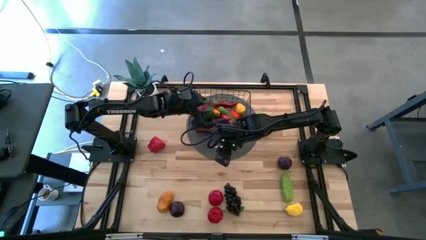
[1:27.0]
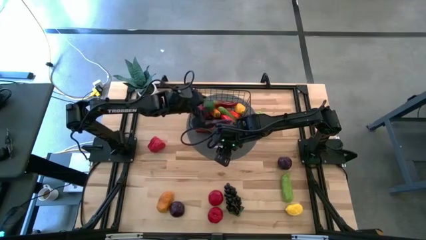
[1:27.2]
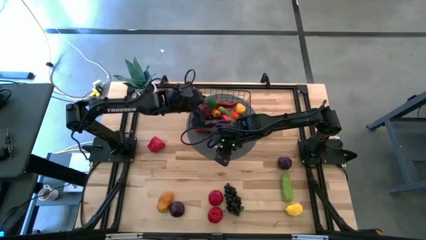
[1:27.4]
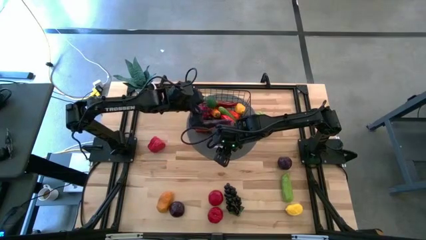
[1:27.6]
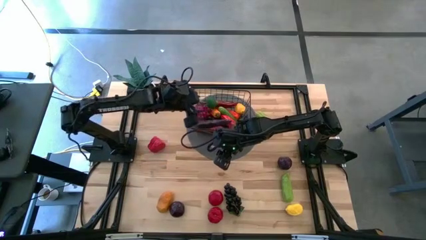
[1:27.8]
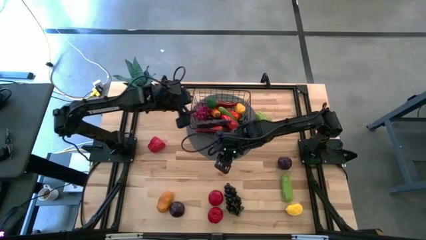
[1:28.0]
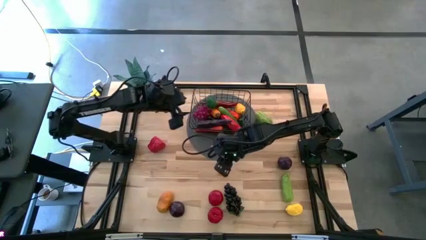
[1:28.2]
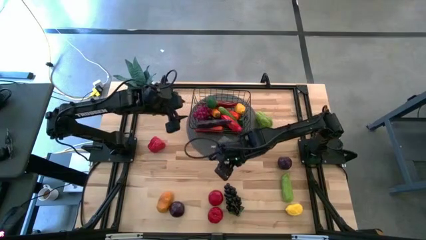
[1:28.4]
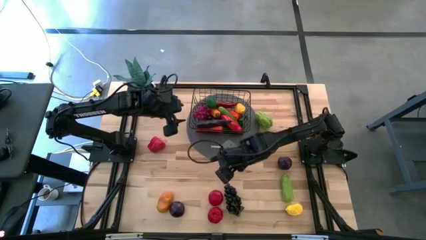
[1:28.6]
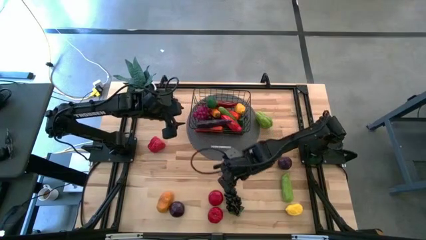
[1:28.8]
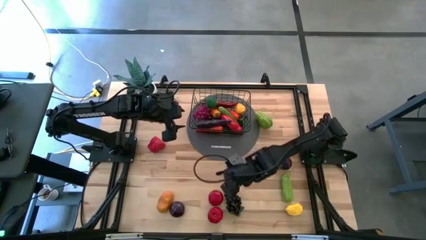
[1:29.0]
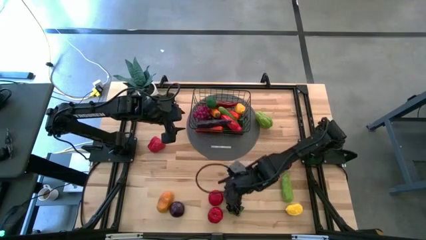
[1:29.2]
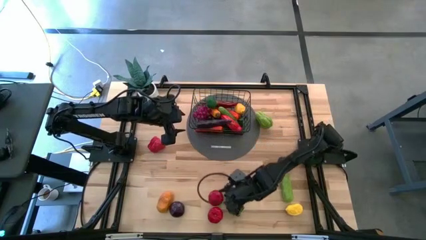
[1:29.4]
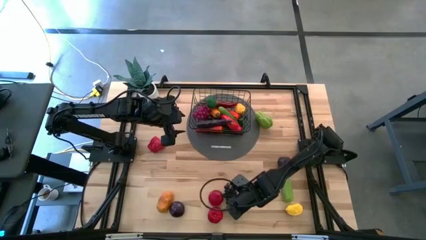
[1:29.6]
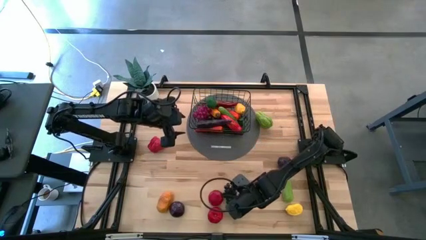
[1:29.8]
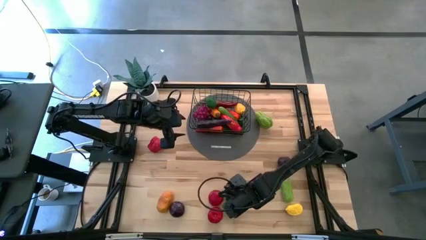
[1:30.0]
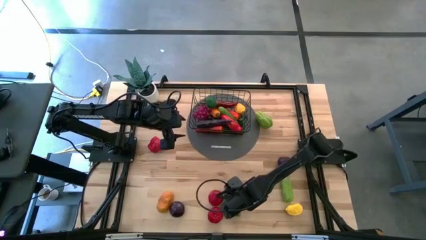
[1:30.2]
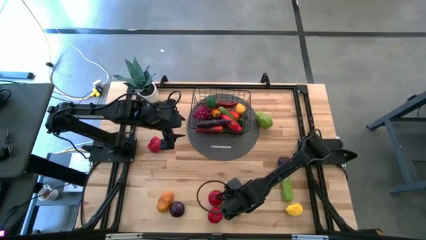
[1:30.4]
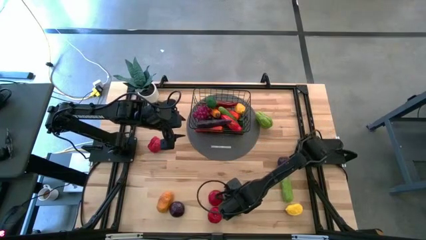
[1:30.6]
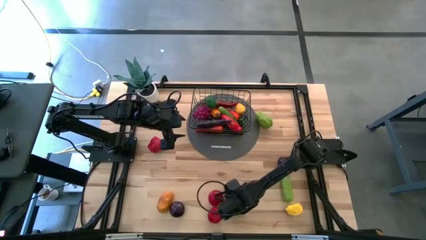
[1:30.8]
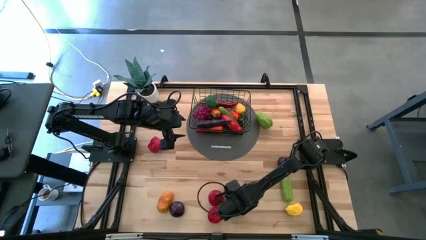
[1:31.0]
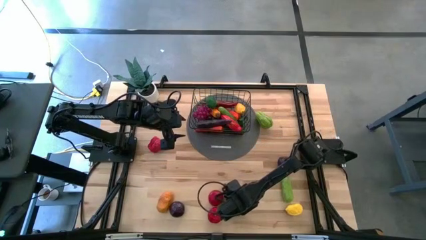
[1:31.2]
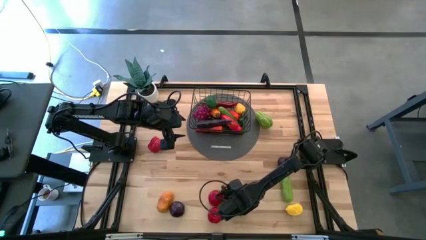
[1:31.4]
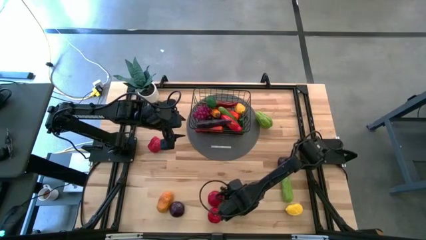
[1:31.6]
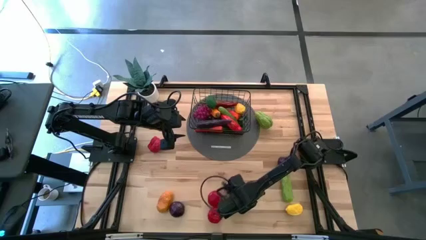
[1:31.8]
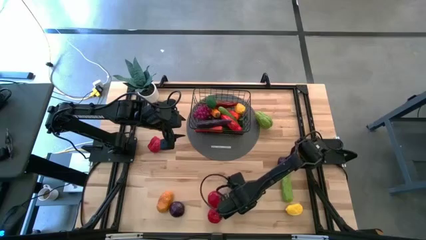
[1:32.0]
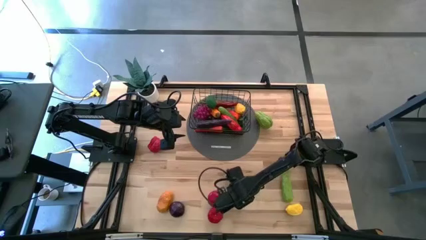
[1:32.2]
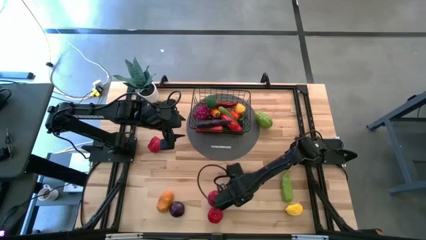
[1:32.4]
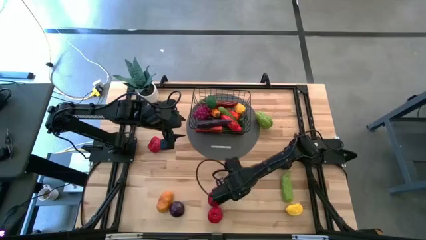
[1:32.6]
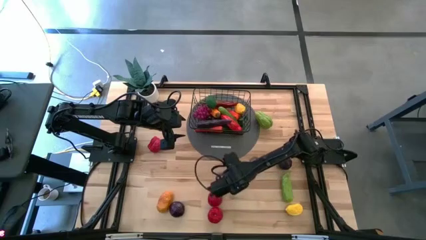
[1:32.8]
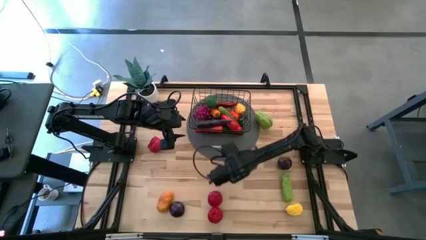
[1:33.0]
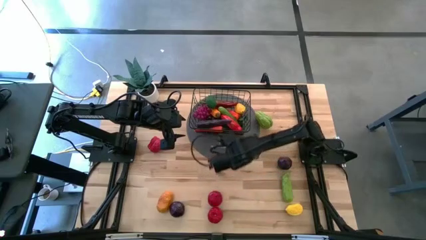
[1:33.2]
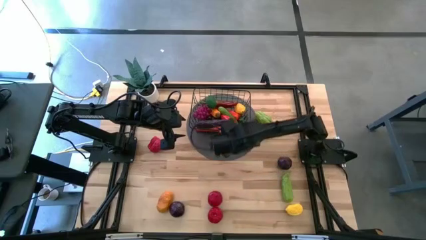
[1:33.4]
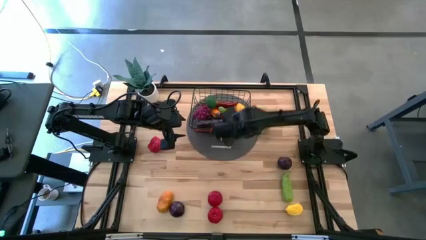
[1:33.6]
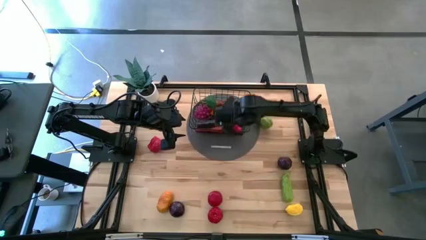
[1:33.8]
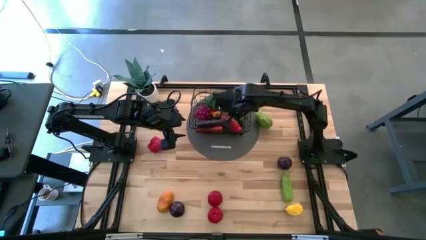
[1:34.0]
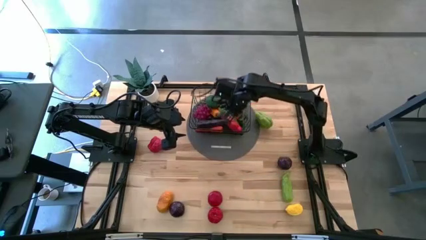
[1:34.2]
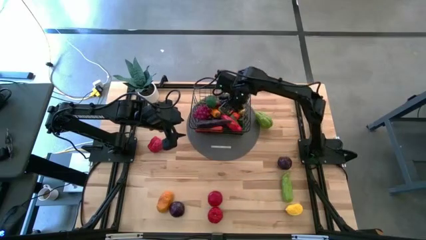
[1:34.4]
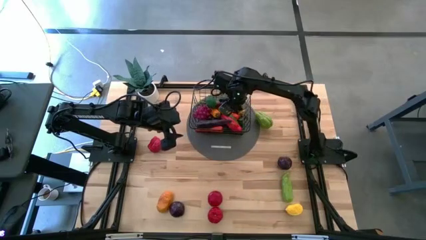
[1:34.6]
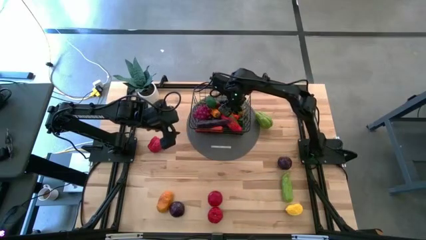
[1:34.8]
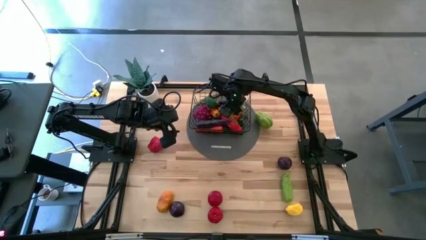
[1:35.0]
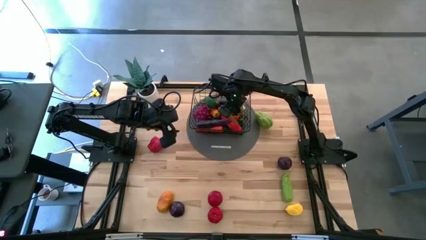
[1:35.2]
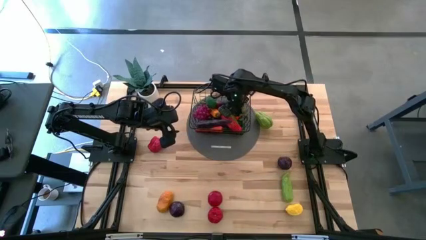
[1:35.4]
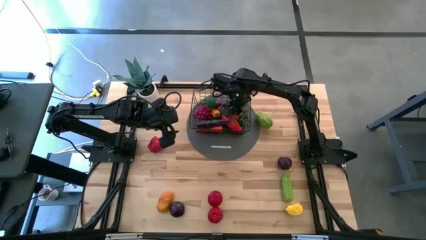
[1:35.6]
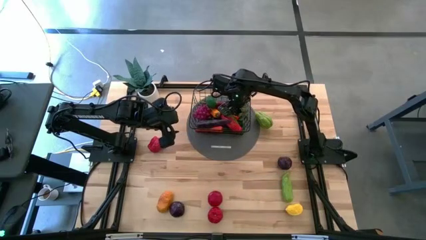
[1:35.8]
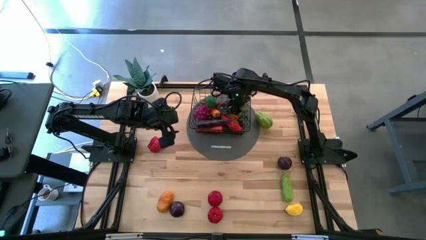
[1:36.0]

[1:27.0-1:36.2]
Task: Build produce basket
Put the grapes into the wire basket

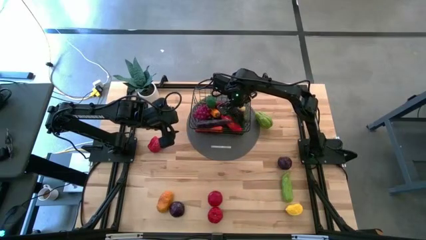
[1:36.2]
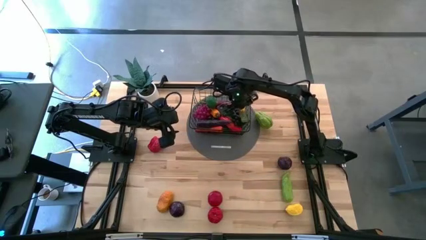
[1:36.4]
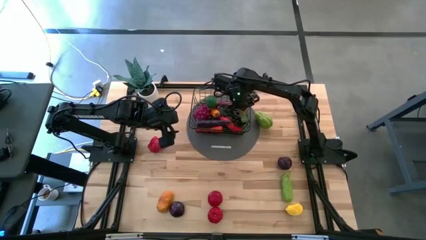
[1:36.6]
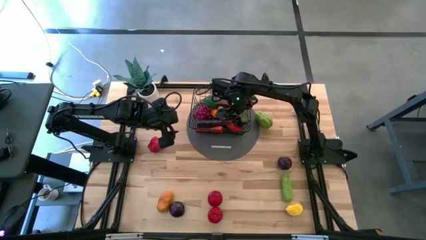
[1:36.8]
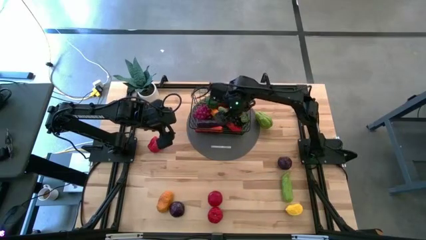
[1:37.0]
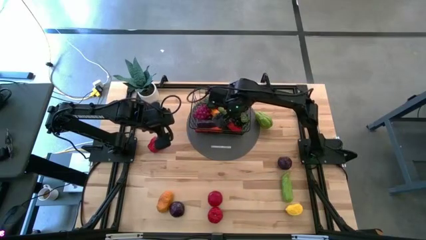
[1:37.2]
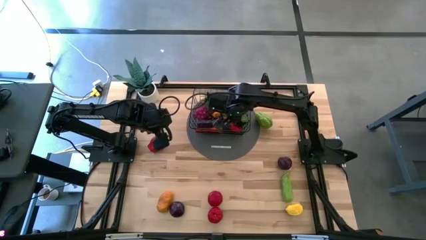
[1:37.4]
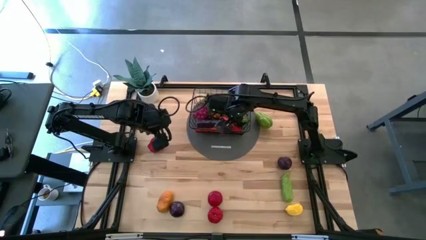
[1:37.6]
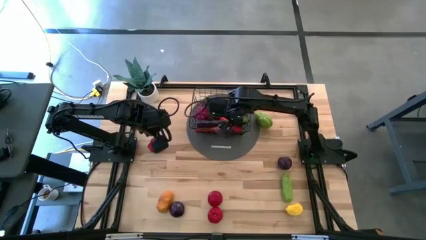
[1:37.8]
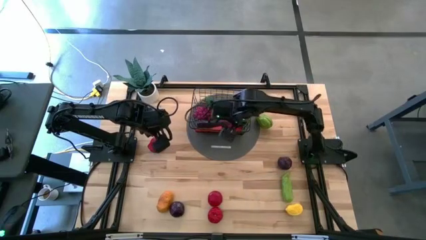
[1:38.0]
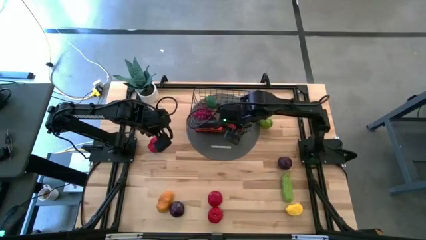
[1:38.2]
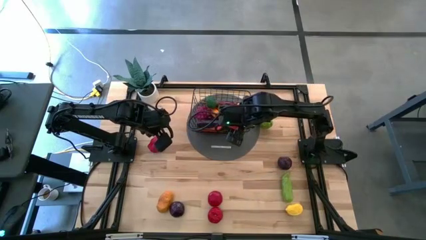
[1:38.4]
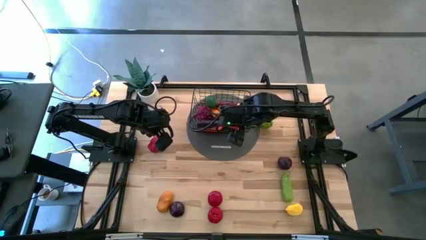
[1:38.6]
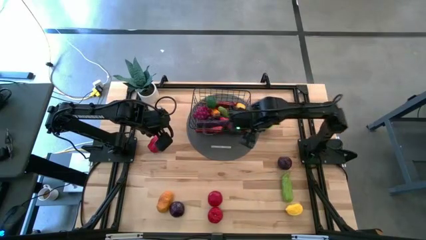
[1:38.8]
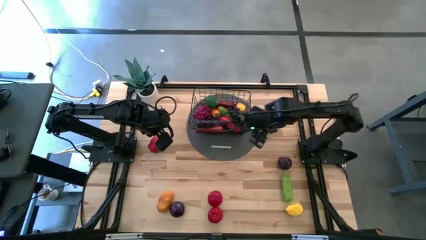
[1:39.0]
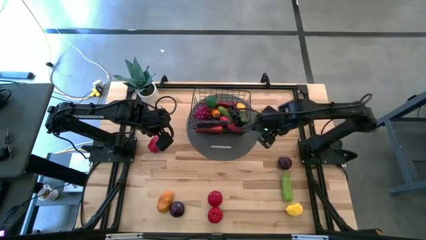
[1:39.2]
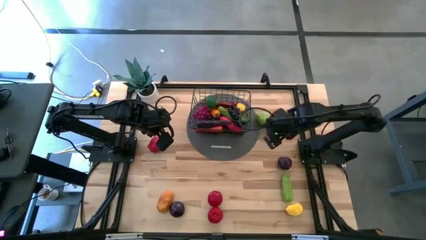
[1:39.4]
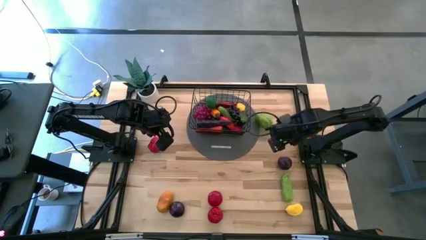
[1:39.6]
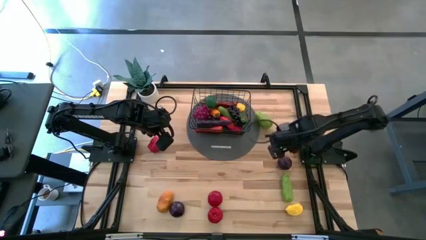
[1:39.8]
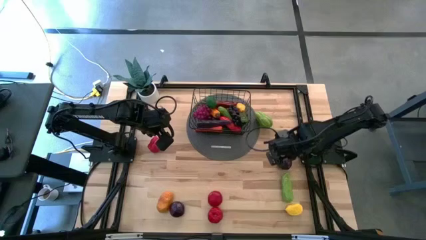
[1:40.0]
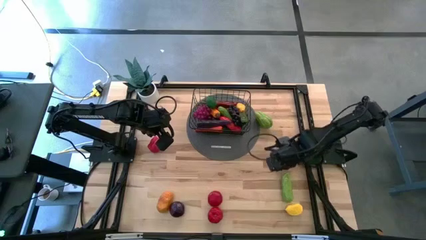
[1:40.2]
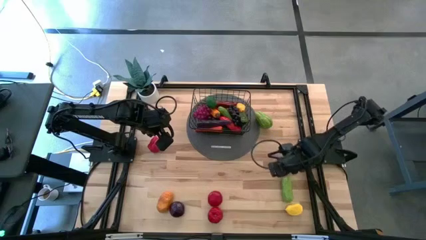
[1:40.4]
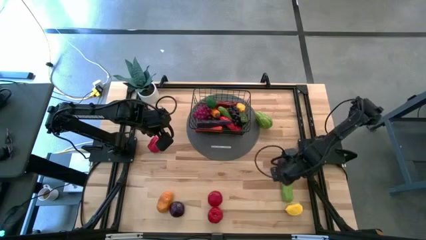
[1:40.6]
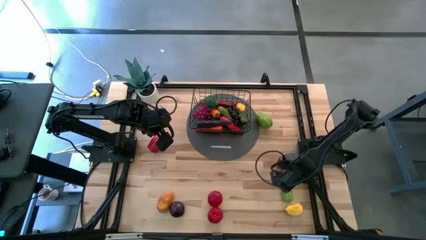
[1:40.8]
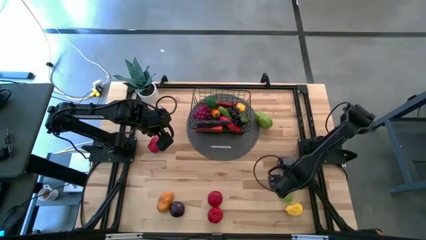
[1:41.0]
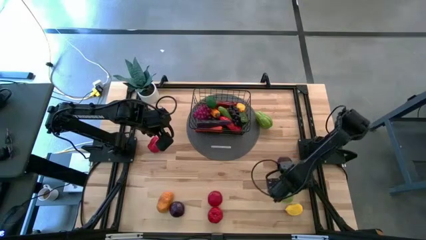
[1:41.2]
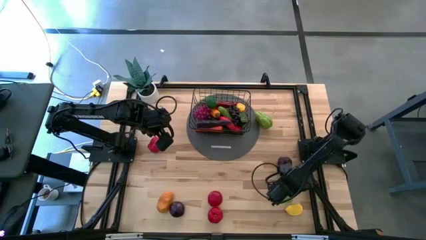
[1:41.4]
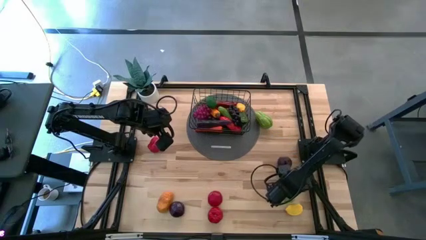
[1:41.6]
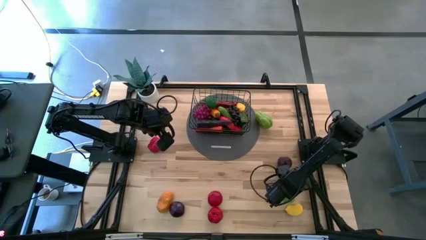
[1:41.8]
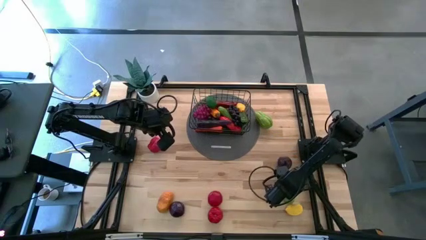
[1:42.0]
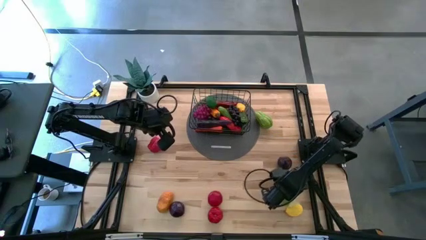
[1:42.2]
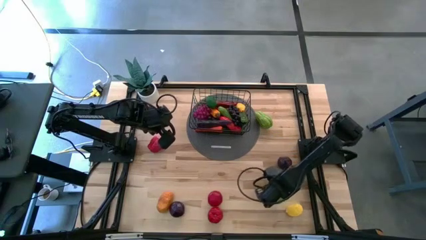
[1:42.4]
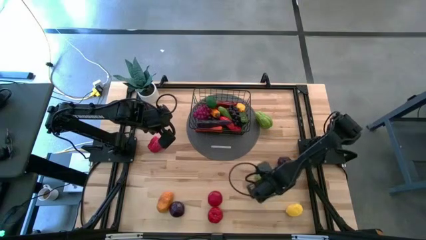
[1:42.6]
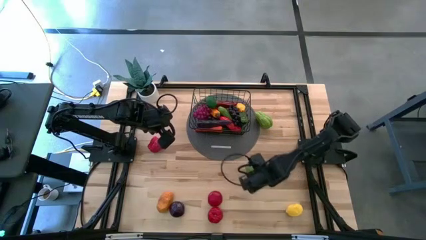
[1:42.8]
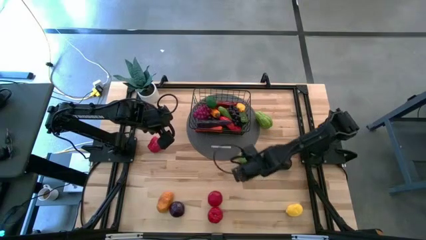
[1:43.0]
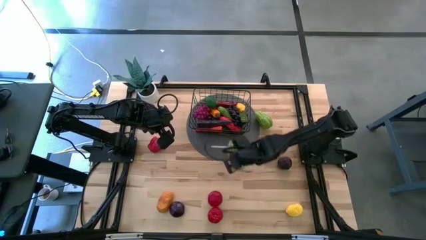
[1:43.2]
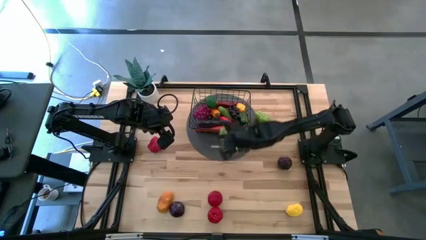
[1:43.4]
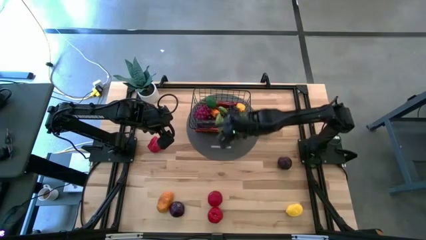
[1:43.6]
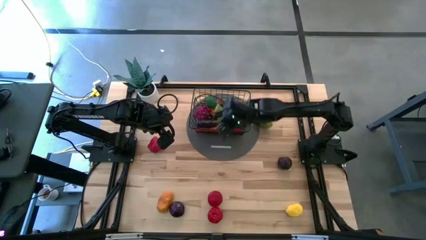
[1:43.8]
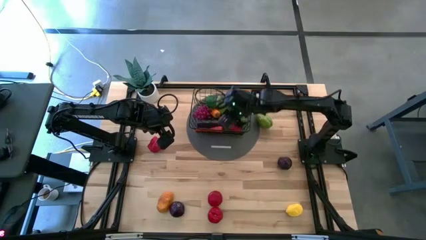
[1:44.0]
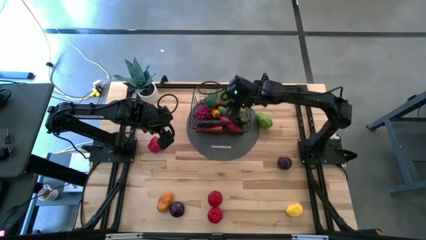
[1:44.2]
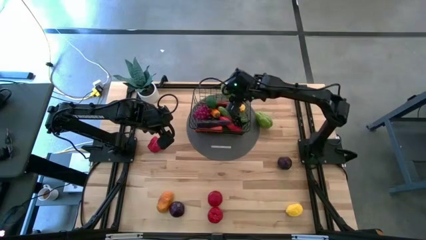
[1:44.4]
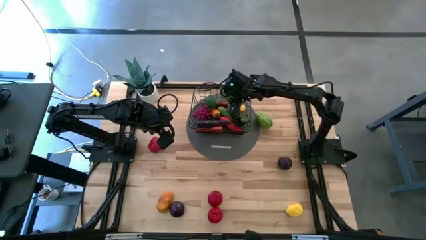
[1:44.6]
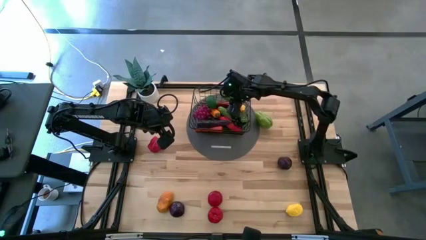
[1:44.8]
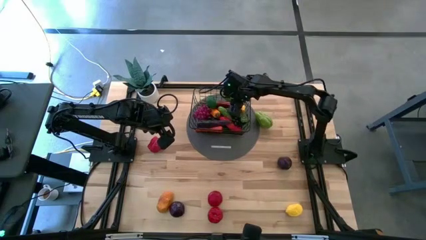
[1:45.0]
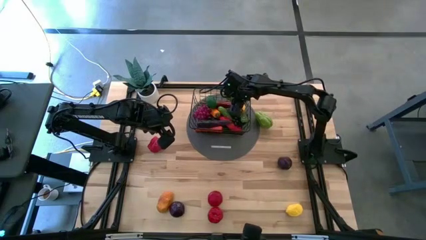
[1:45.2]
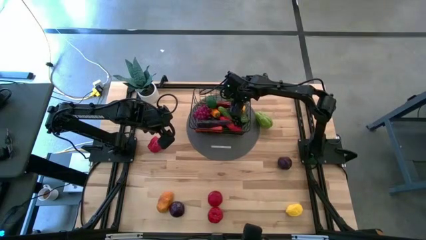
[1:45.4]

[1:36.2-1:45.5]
Put the green cucumber into the wire basket
